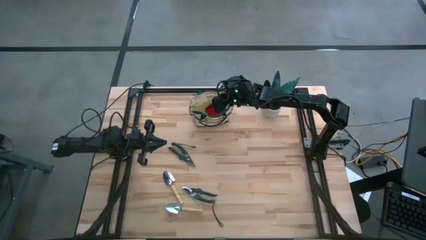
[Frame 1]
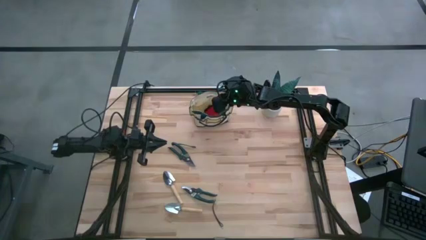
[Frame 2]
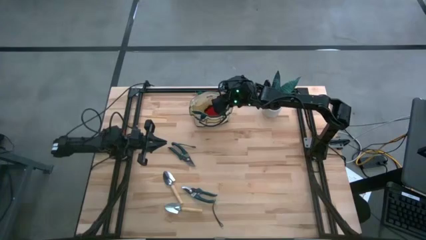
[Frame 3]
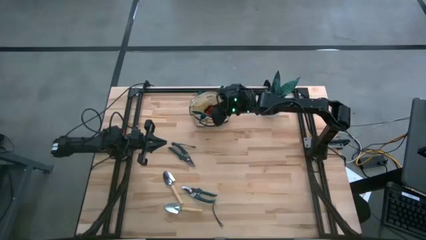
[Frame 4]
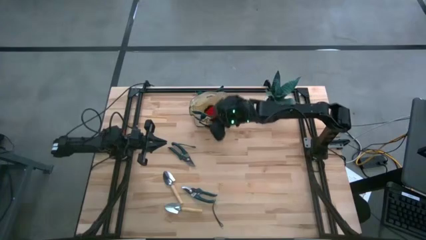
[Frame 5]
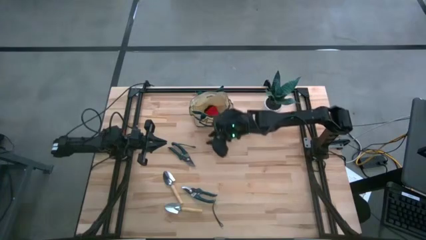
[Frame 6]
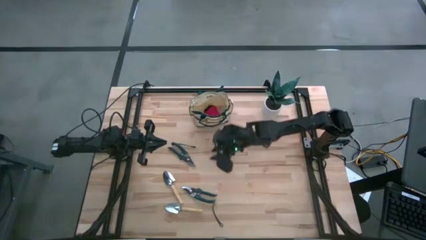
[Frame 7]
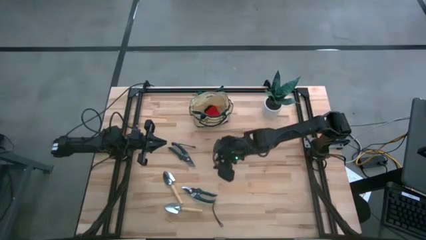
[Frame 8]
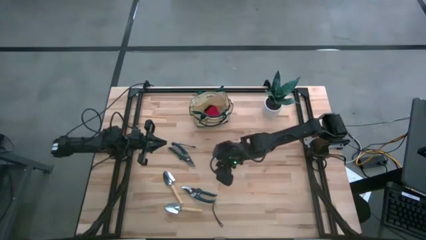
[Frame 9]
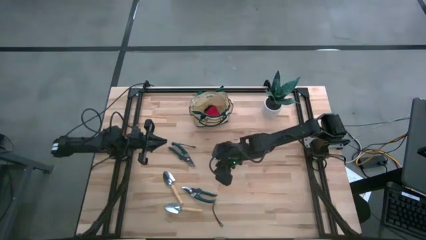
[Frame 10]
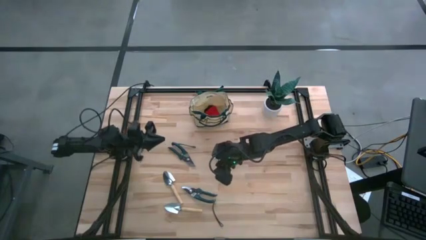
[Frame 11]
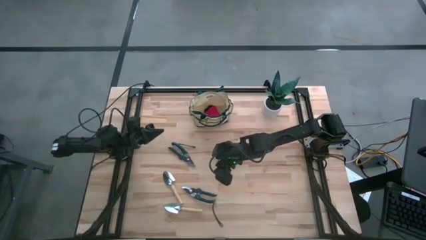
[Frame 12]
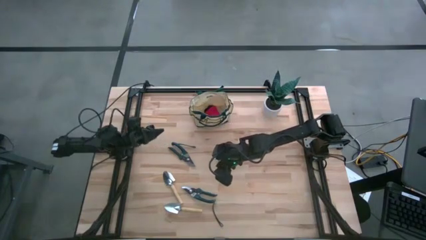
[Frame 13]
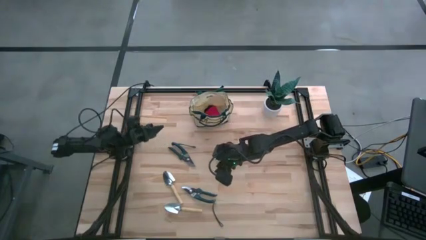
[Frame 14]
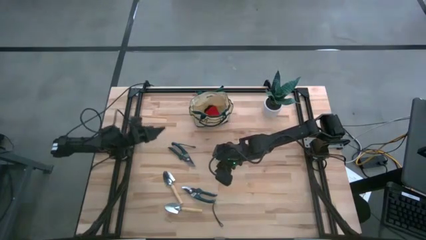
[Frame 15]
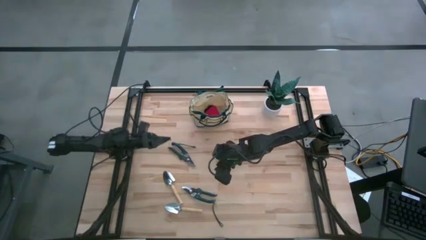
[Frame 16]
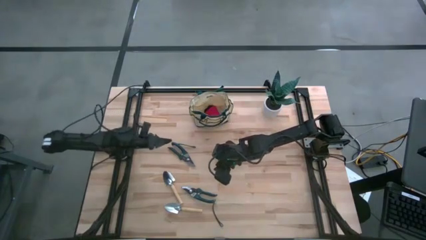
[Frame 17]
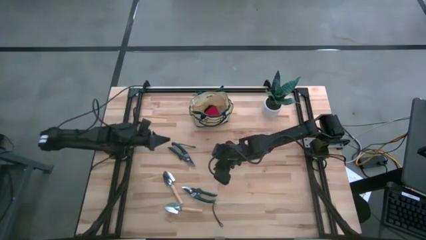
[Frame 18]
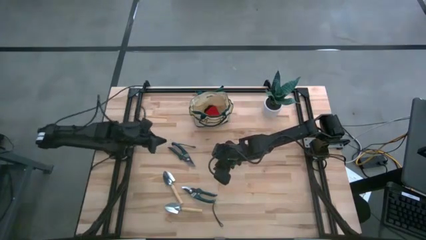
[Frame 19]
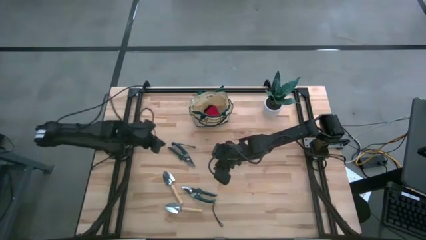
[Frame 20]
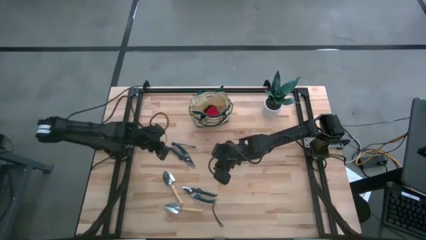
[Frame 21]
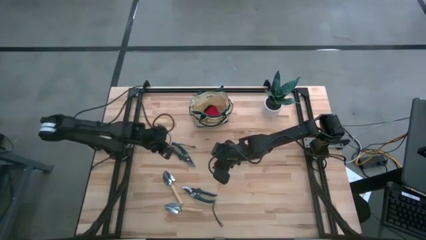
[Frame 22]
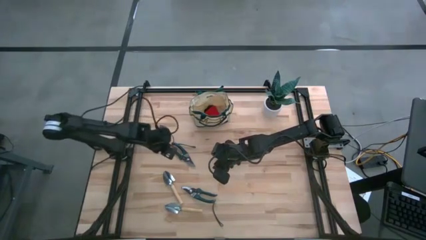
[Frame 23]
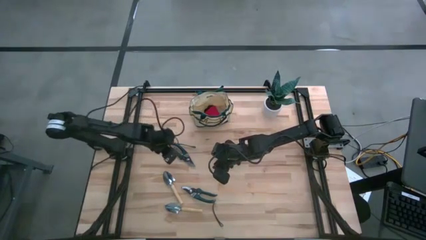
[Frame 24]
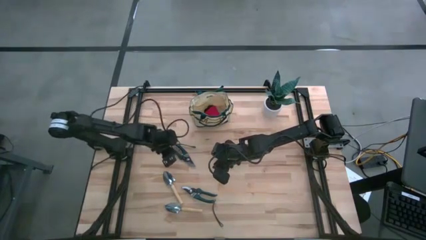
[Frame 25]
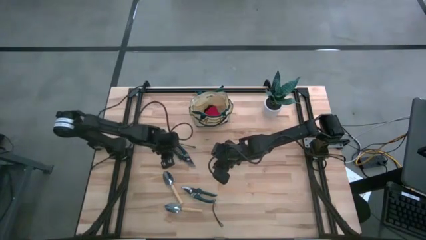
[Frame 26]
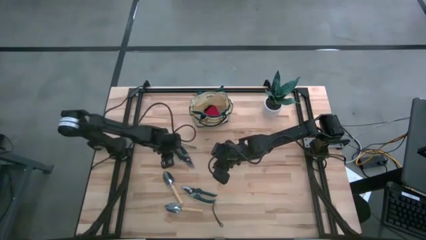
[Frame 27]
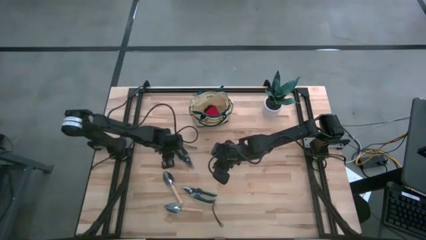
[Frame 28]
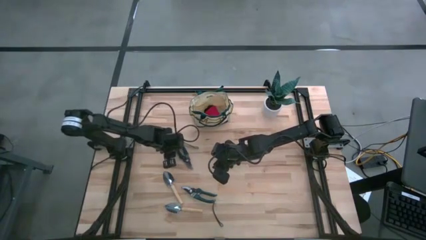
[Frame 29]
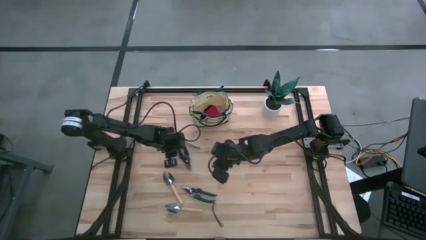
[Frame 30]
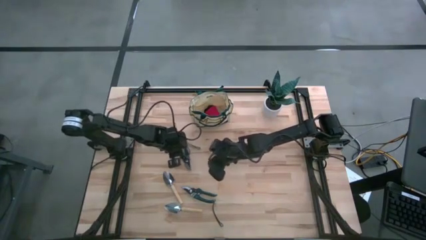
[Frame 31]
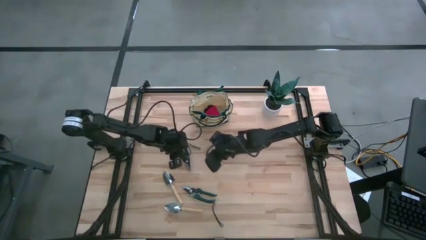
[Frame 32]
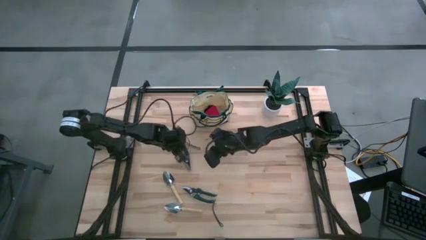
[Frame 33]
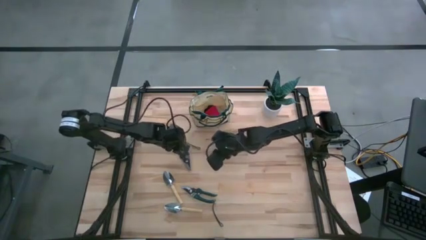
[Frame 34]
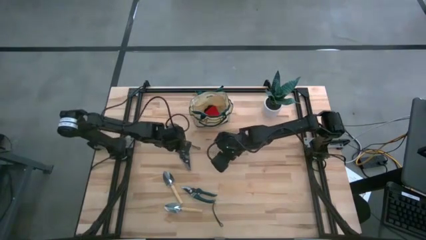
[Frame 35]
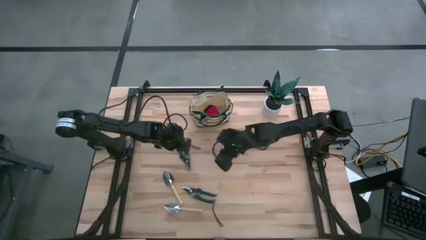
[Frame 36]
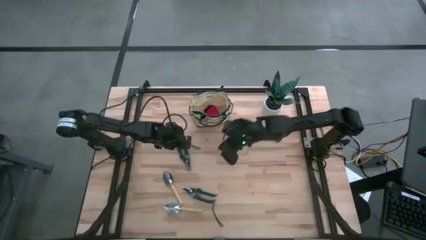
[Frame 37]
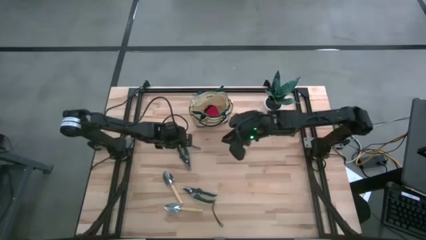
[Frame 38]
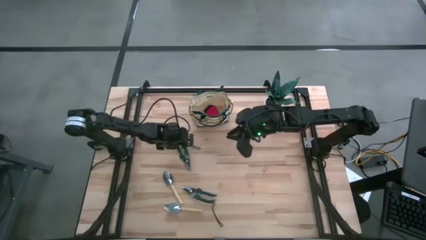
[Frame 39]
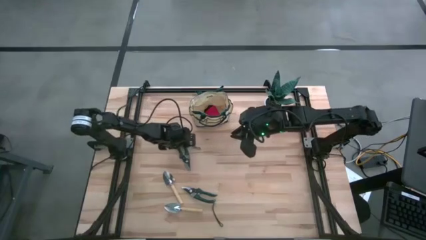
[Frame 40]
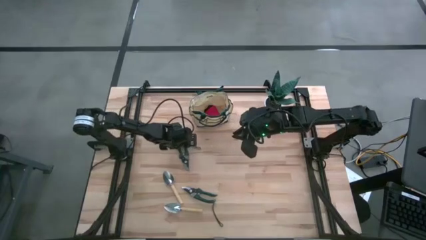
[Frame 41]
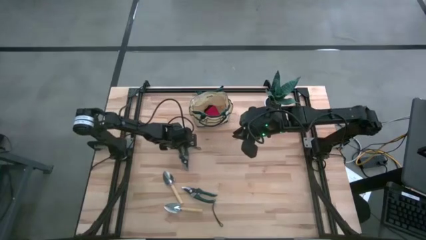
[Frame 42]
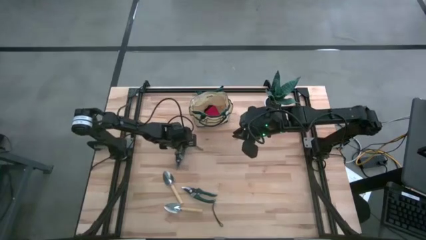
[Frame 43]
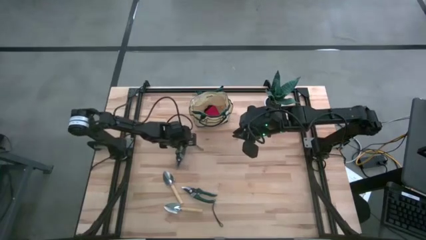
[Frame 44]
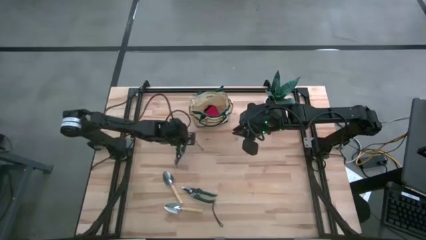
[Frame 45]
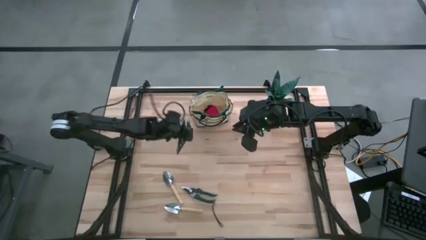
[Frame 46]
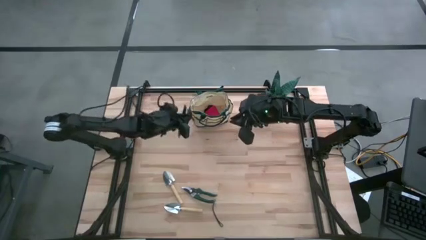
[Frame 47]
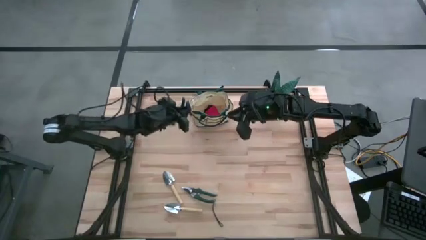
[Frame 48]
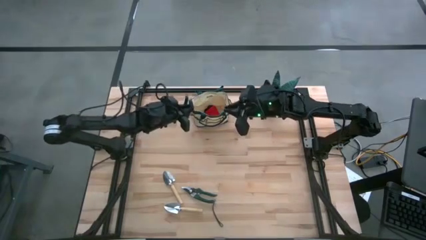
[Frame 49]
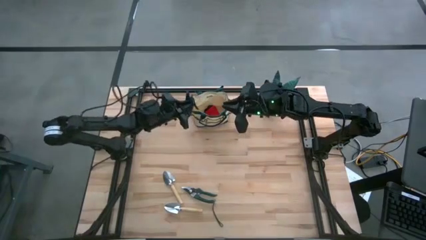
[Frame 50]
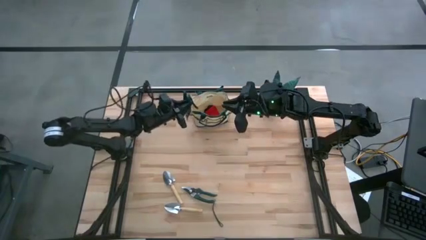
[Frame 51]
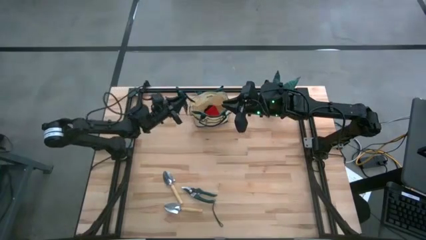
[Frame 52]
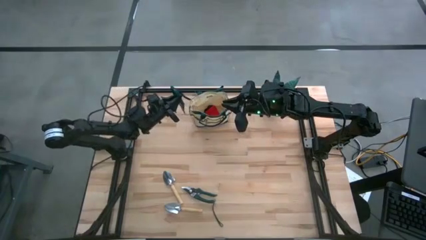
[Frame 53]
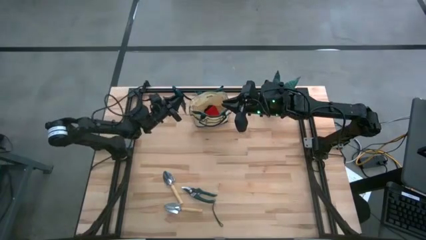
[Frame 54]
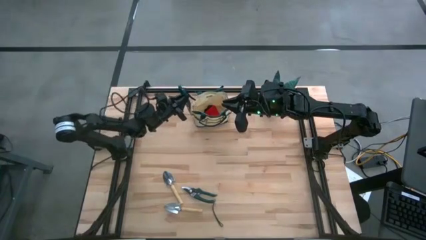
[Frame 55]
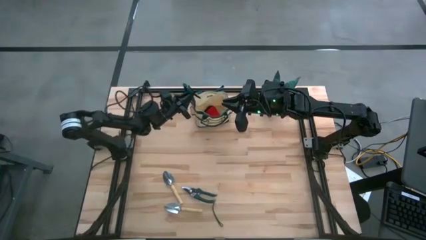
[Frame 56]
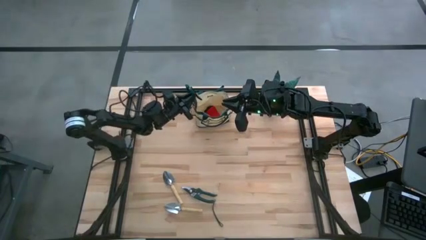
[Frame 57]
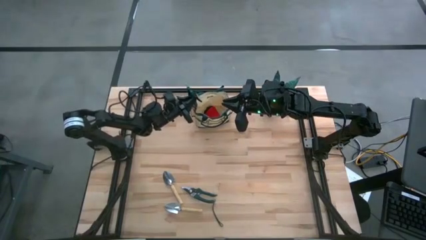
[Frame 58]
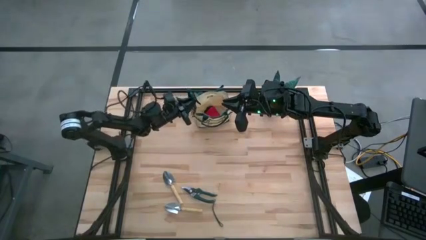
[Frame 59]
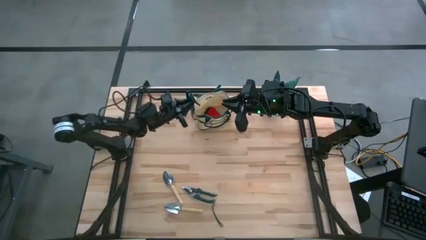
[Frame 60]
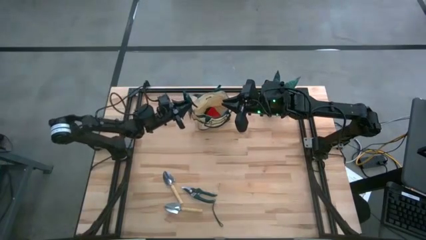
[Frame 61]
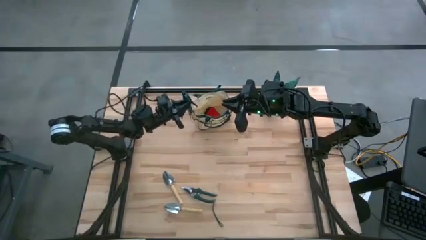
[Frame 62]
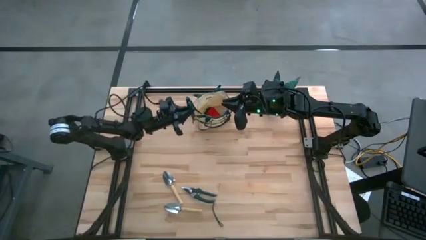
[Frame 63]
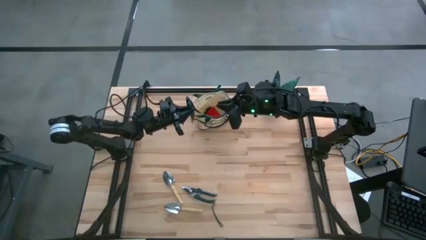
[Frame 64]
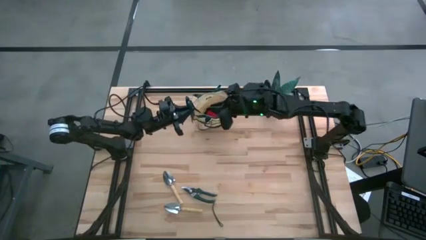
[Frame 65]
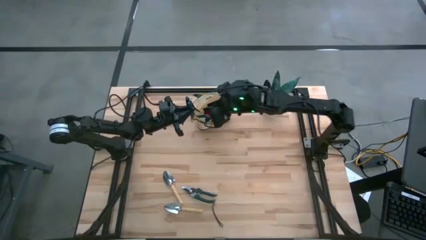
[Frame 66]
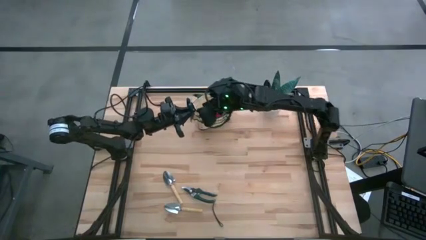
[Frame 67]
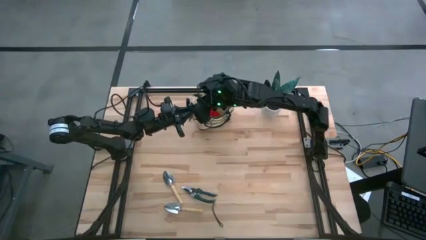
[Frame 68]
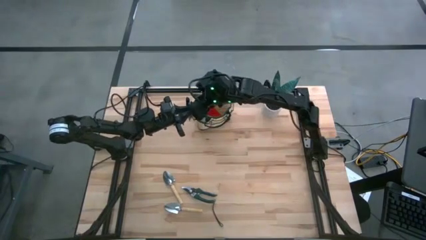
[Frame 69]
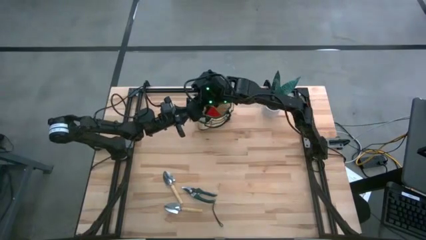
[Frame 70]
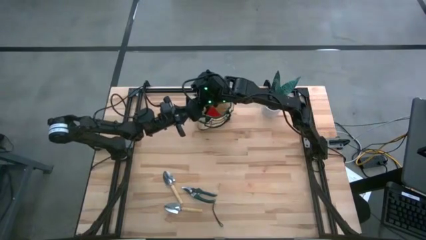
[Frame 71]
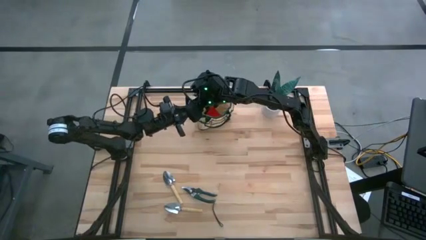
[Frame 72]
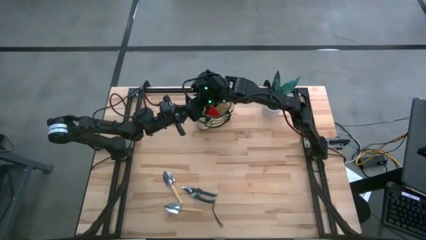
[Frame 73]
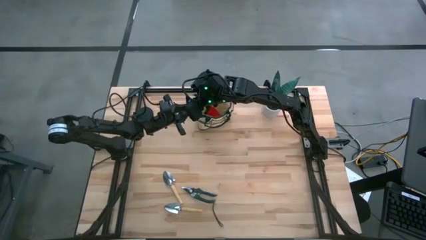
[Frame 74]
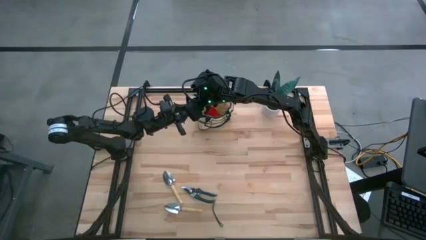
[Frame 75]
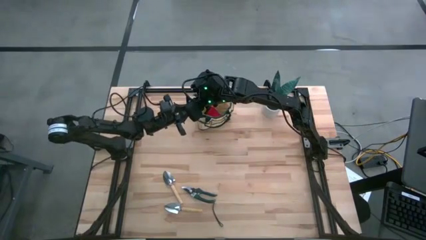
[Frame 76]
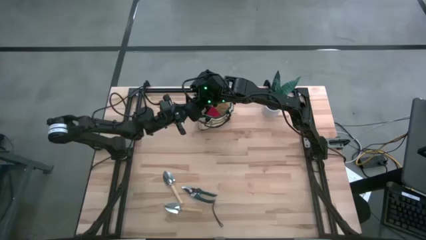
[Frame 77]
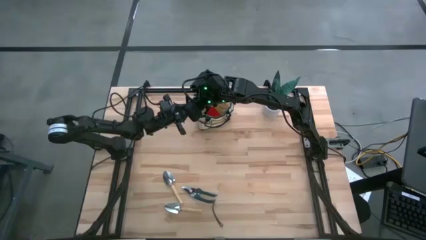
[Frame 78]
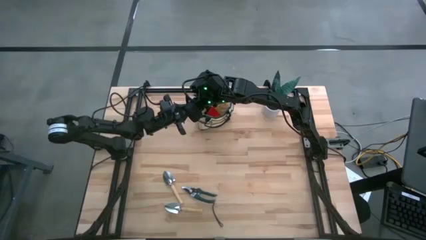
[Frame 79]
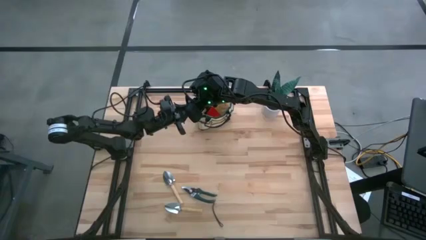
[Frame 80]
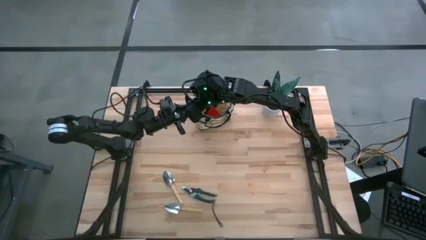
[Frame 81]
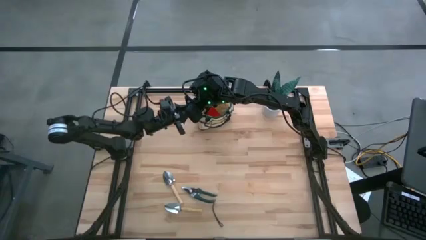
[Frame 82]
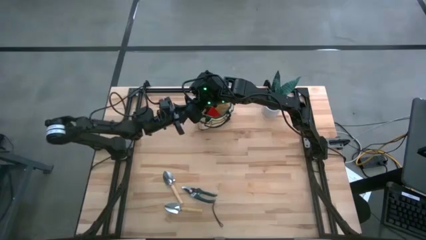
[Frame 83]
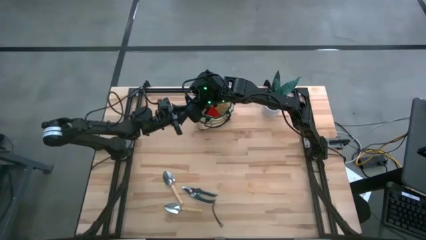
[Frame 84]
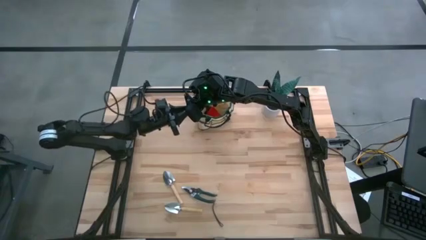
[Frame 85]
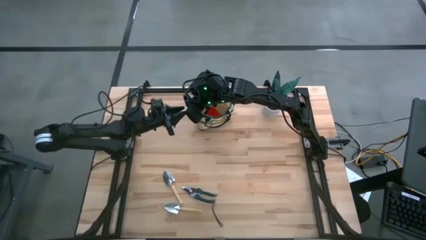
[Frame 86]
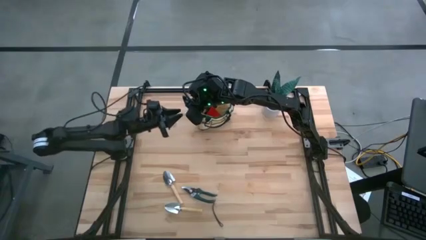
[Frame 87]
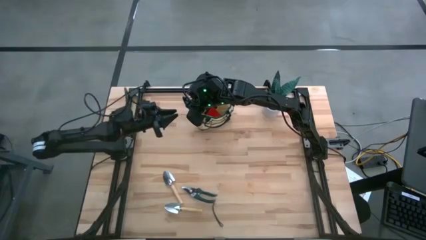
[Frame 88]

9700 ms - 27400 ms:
Task: Pick & Place Garden tools in Gardening bag
Put the top pruner into the left bag pocket
